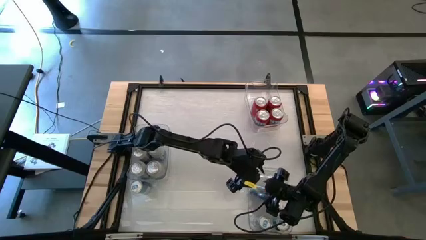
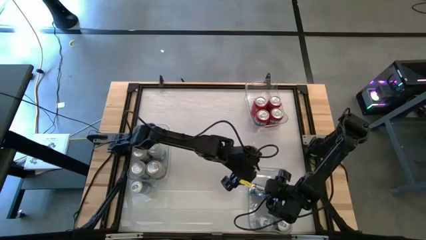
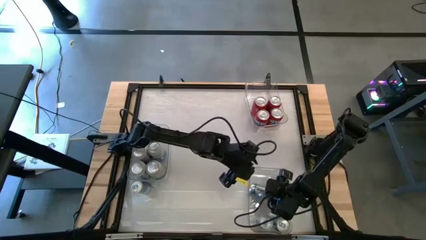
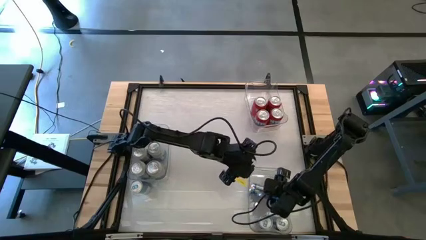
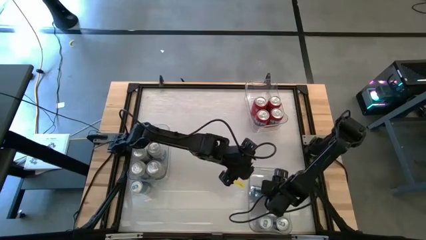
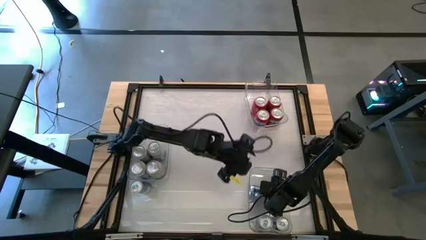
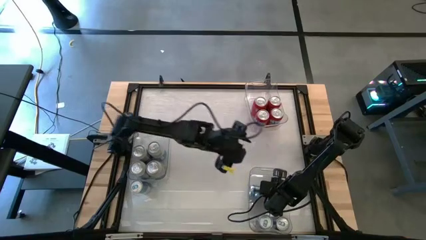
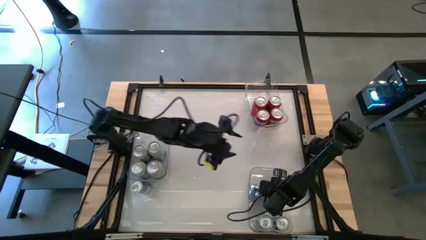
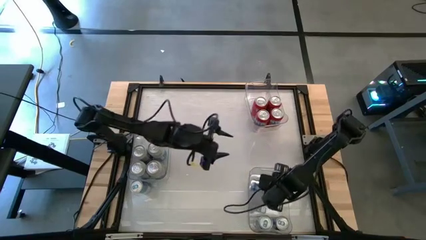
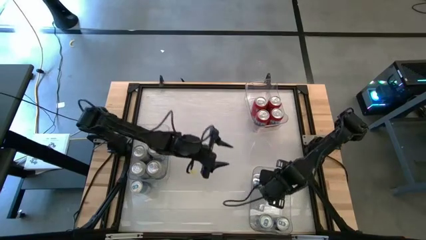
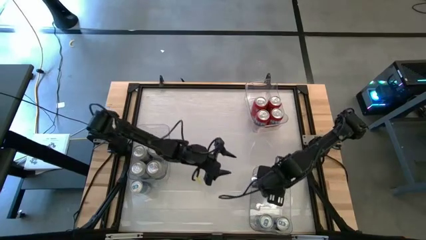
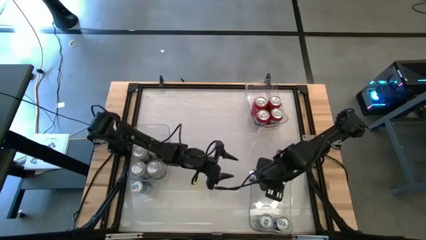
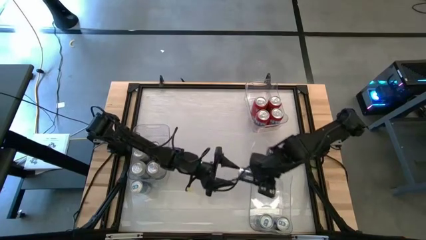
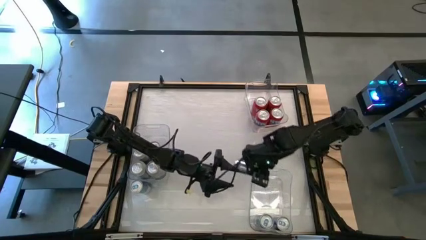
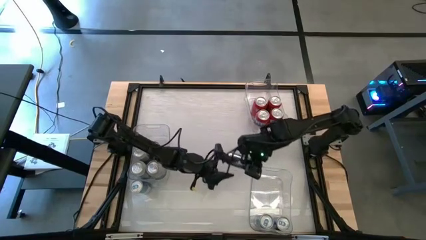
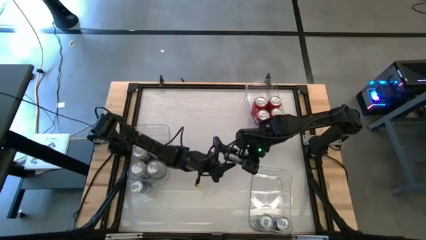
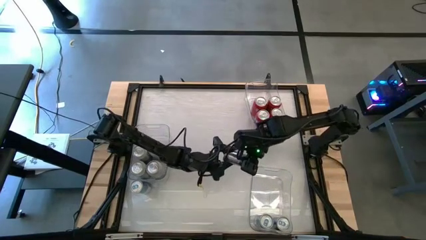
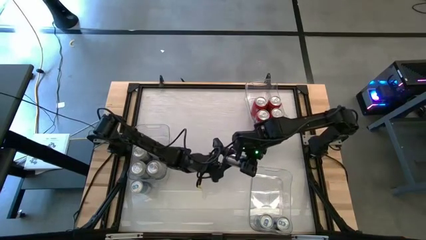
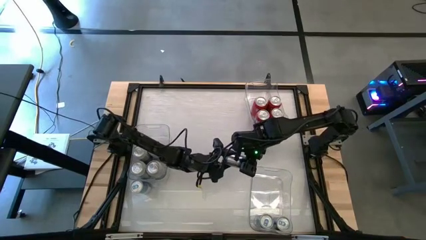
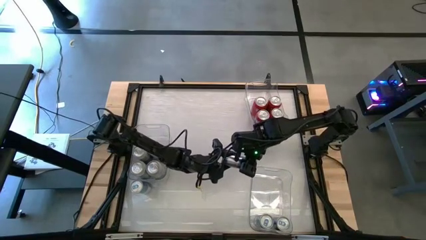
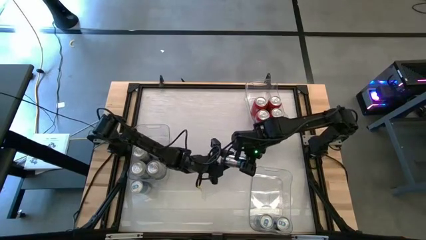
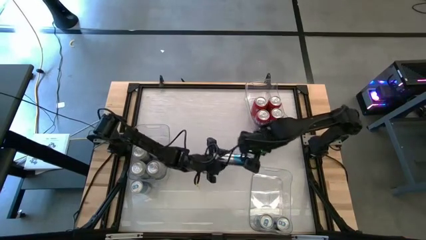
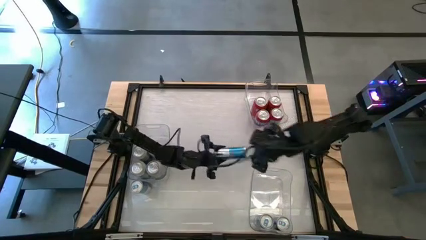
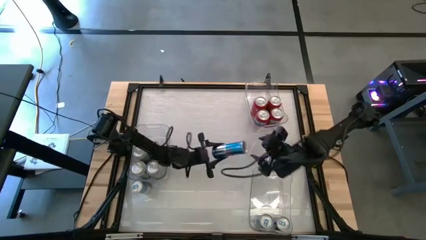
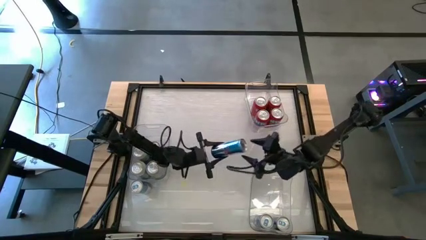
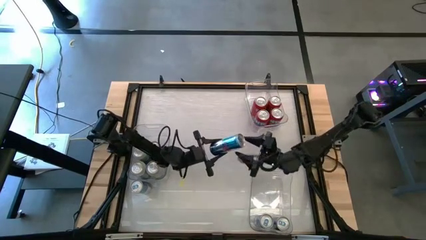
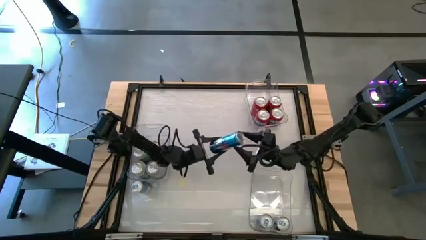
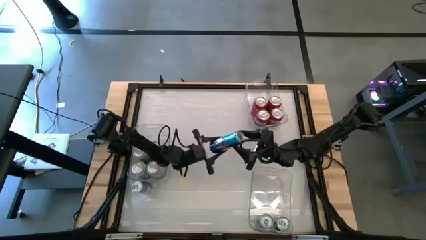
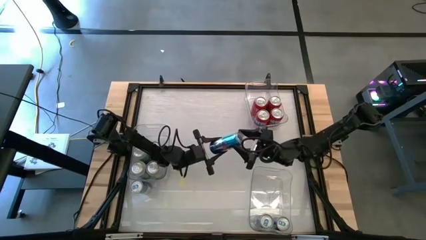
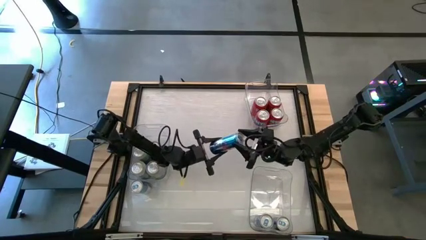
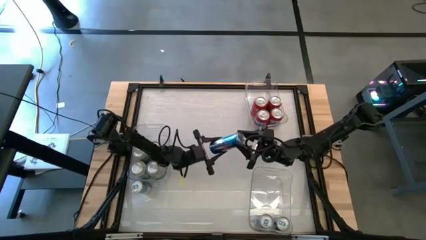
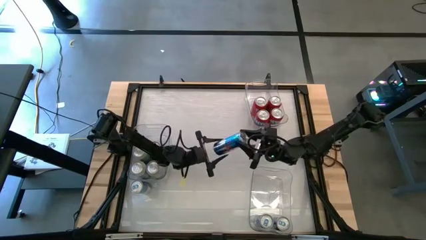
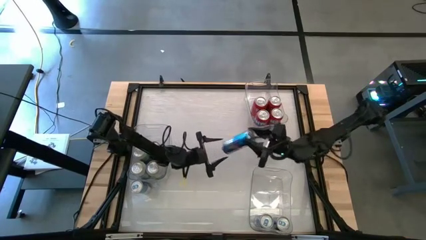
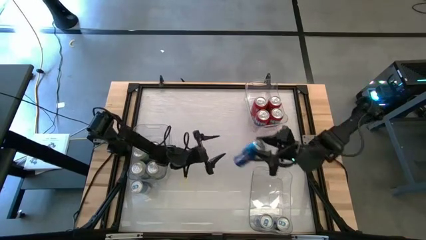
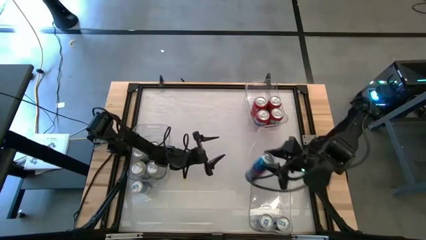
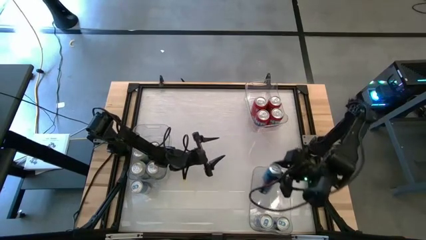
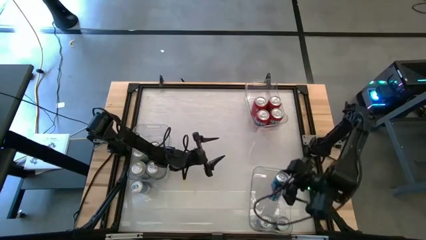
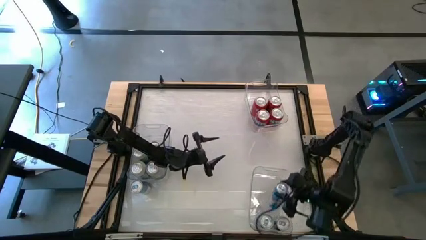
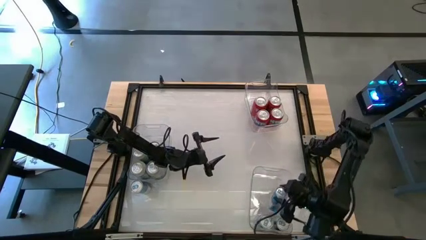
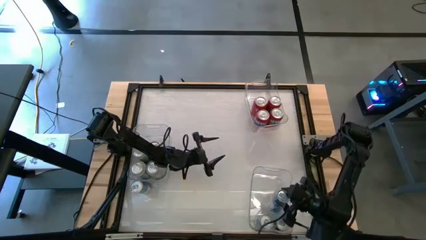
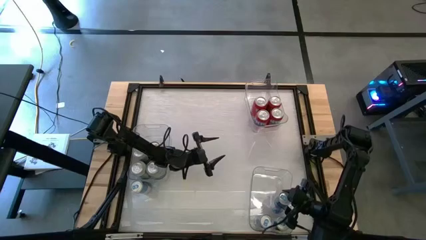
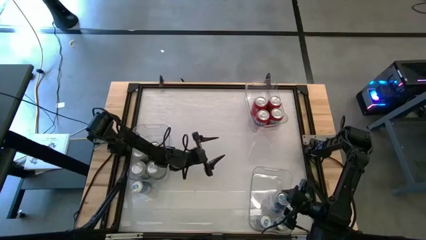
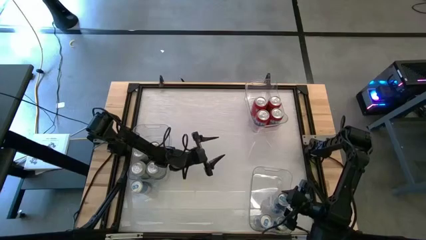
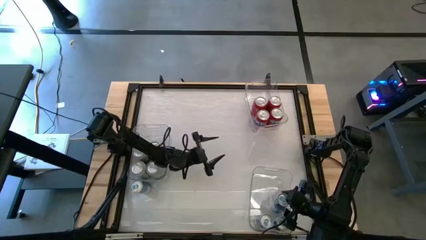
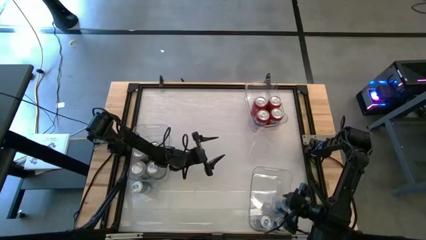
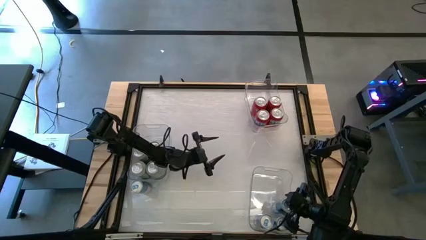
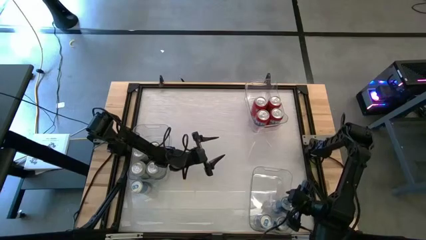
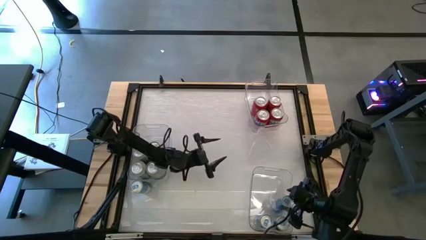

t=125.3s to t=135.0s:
Task: Sort soda cans
Put the top blue soda can into the bottom right transparent bin

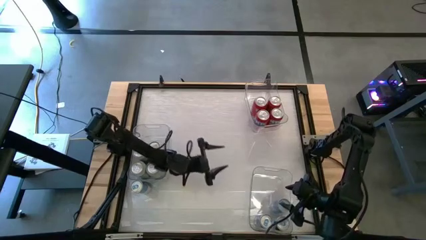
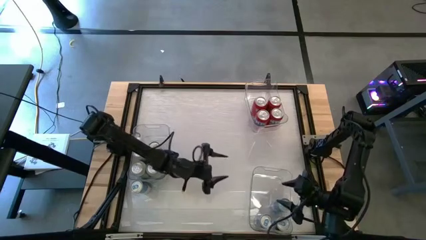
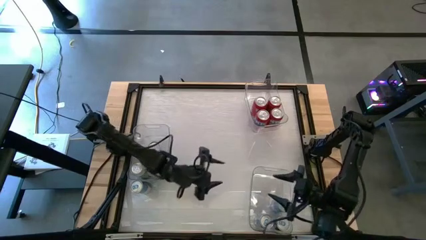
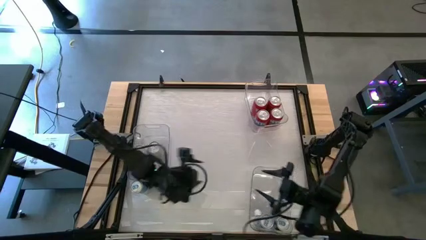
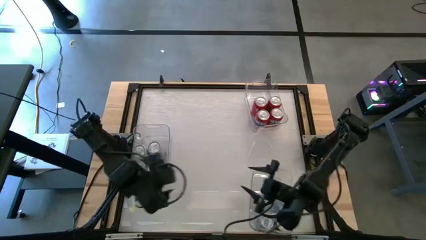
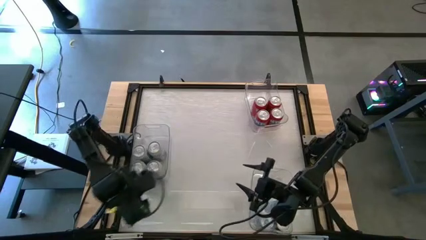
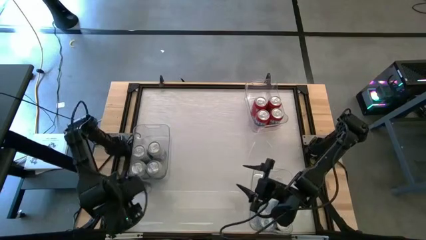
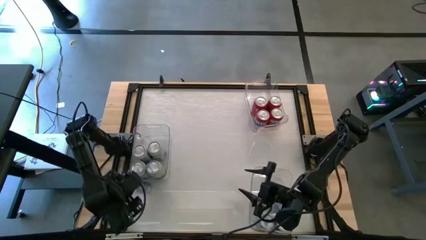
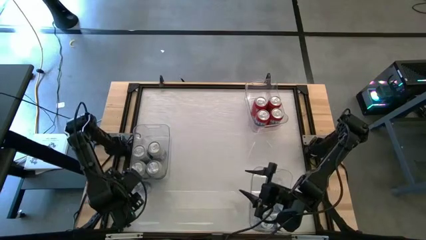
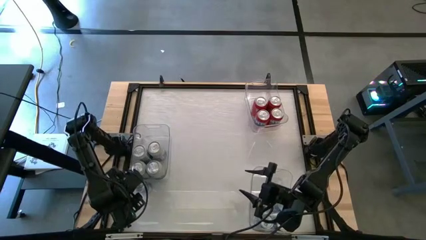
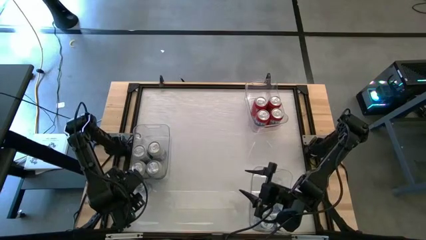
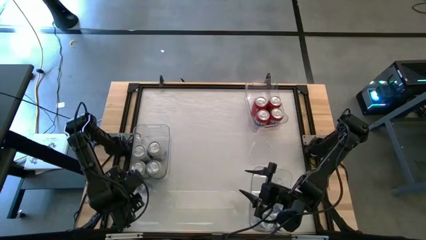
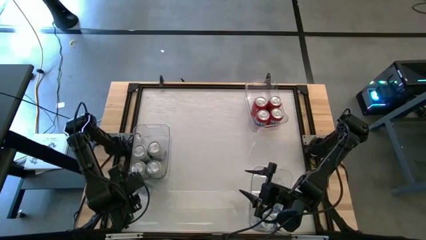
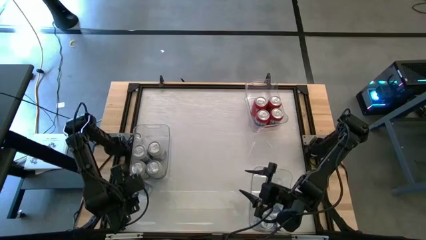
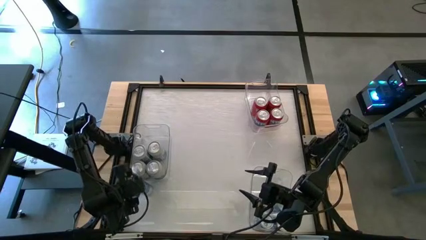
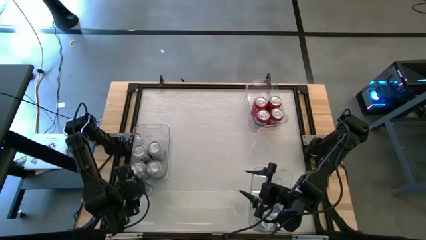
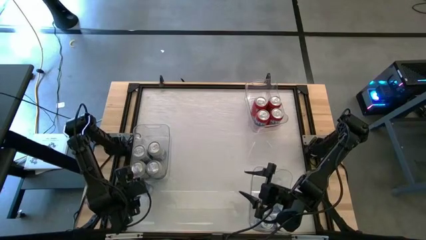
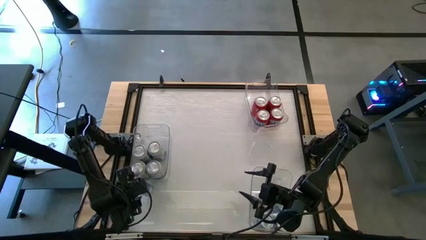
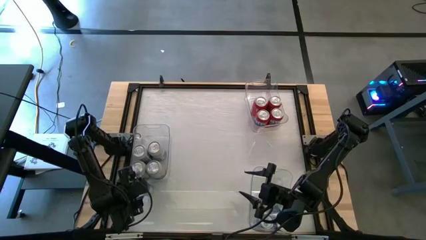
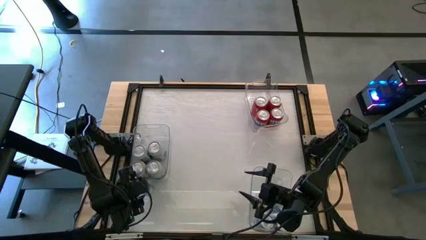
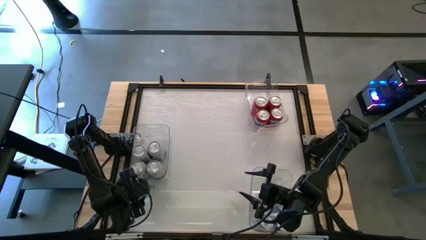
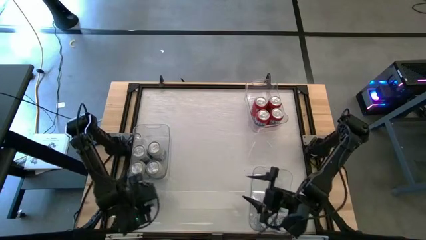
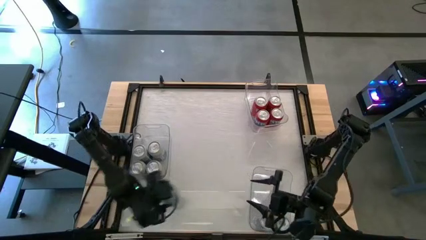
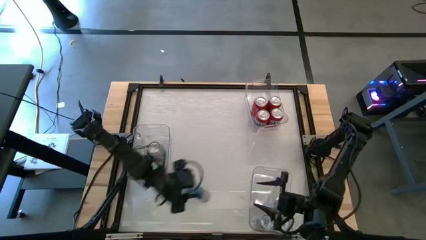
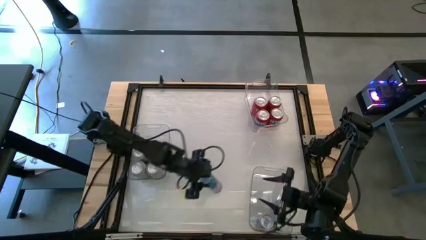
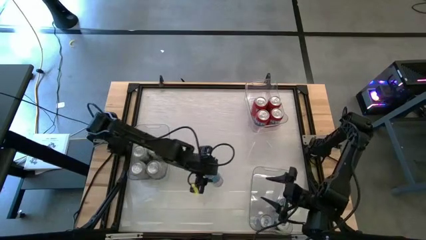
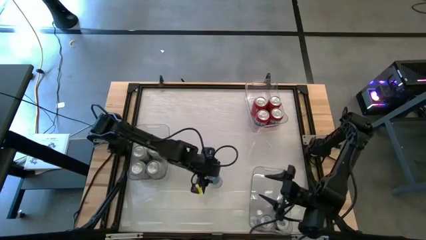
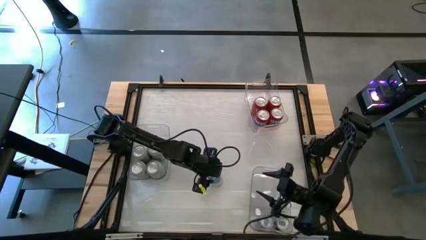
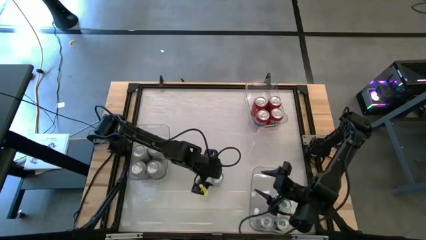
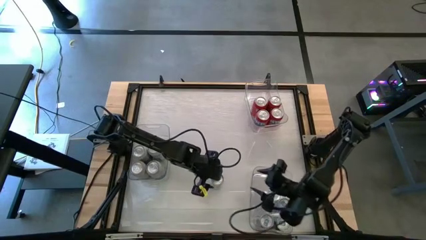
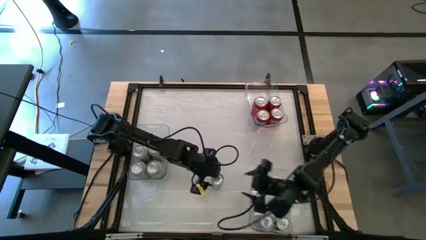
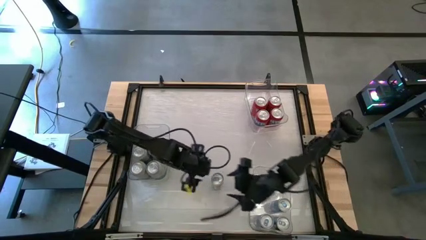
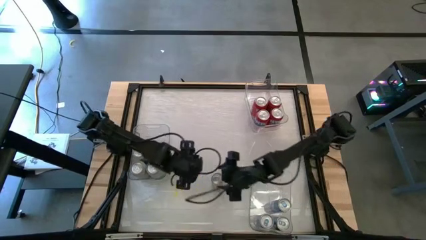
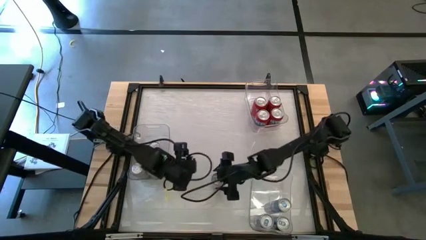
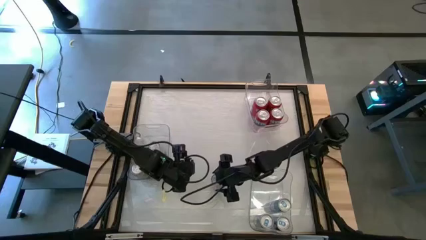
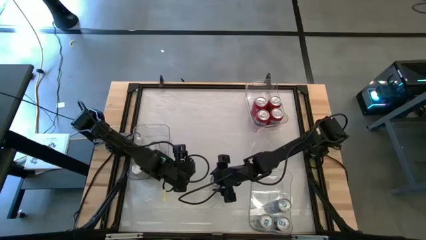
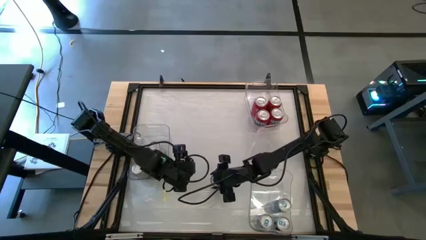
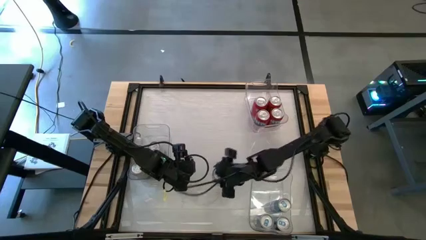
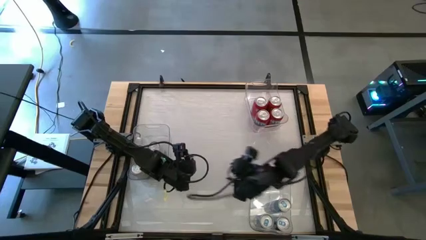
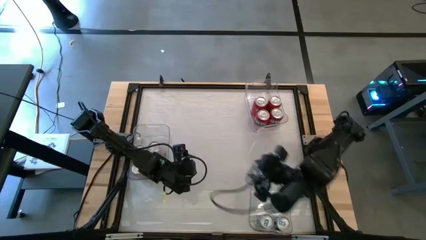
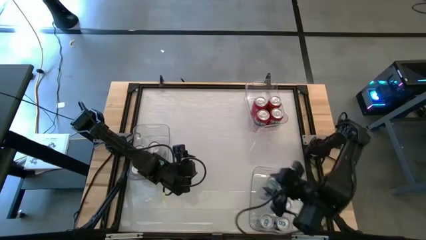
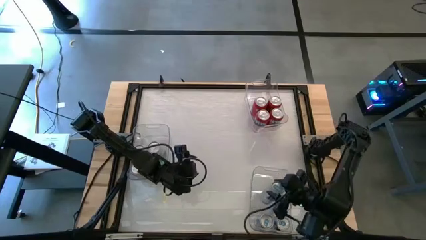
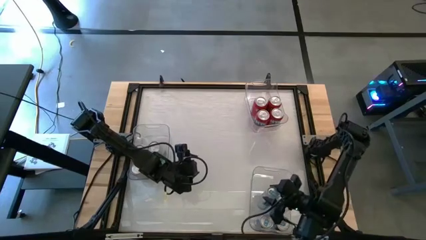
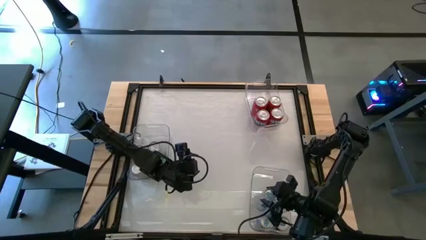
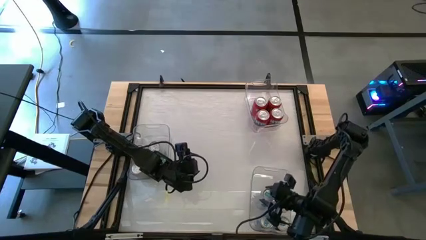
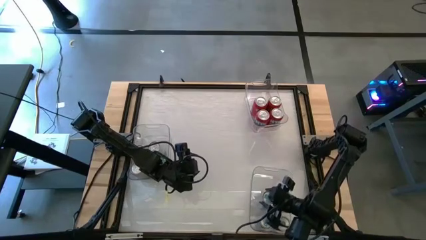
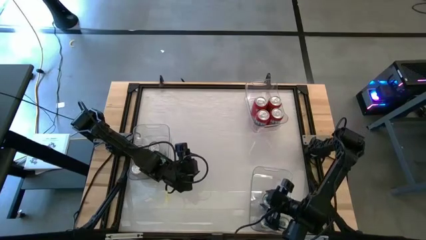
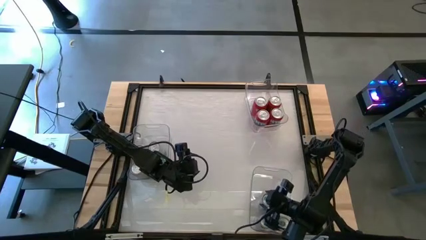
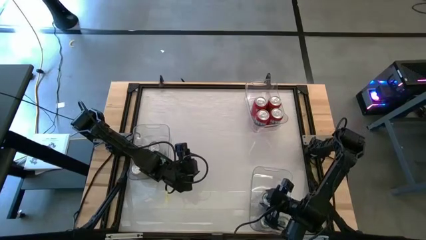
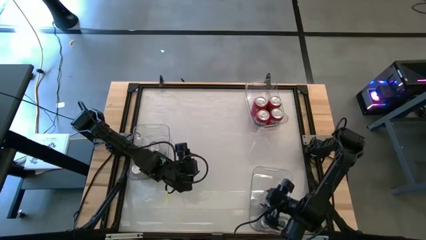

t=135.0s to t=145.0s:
Put the blue soda can into the bottom right transparent bin
